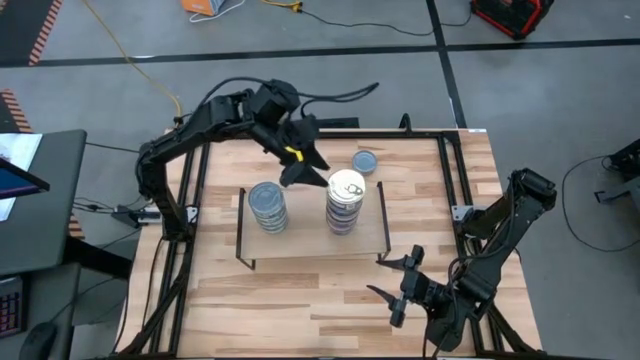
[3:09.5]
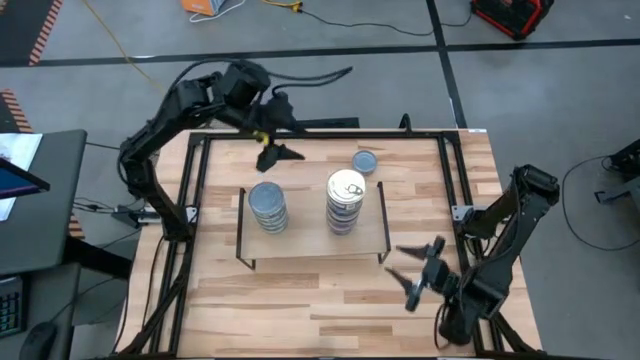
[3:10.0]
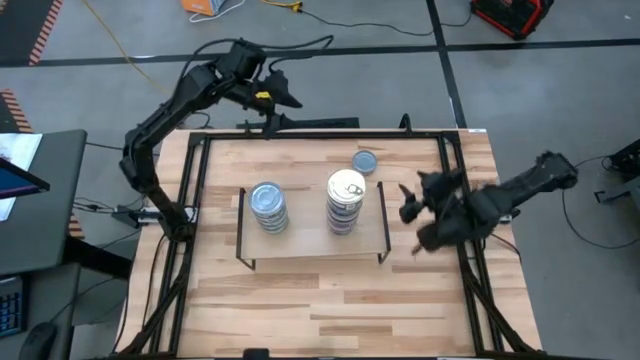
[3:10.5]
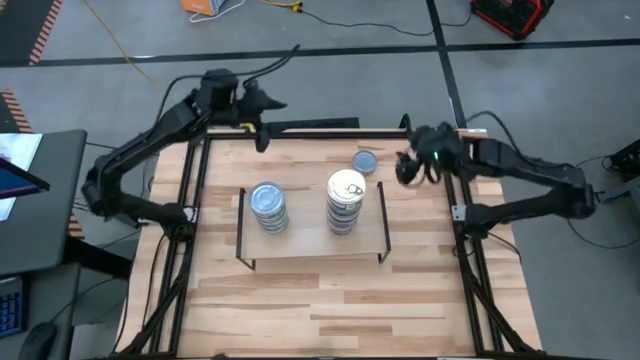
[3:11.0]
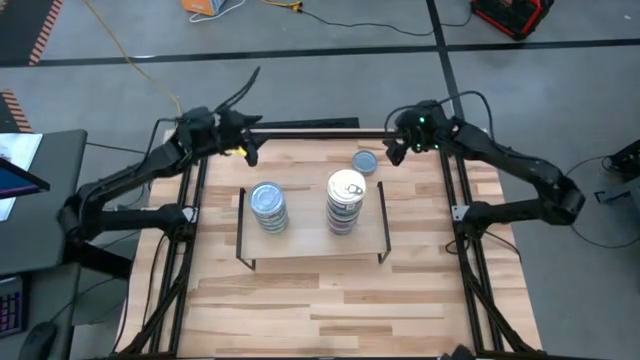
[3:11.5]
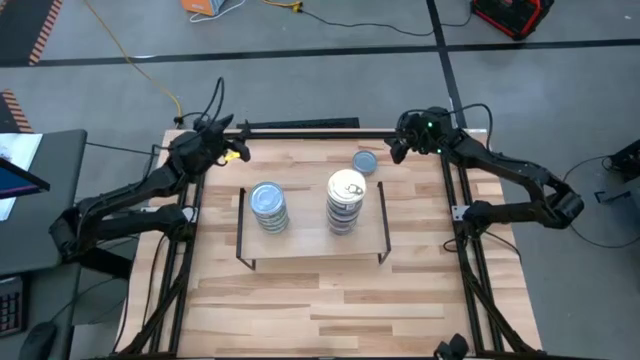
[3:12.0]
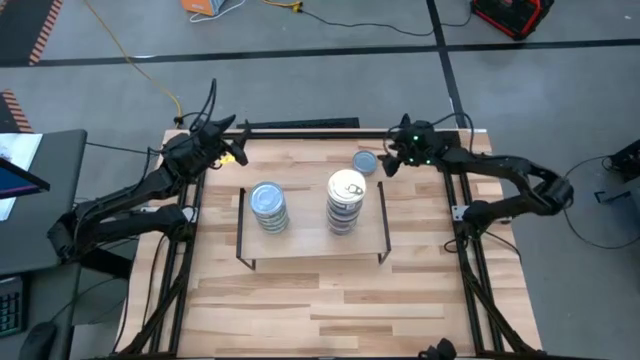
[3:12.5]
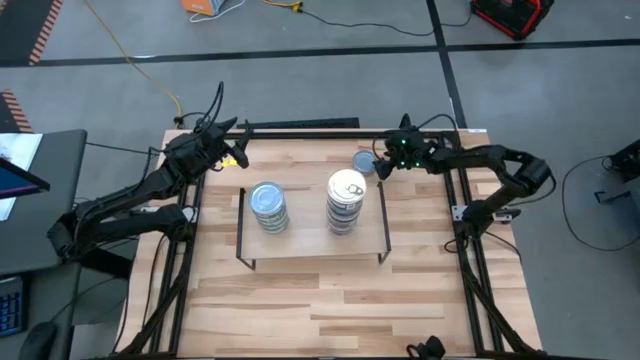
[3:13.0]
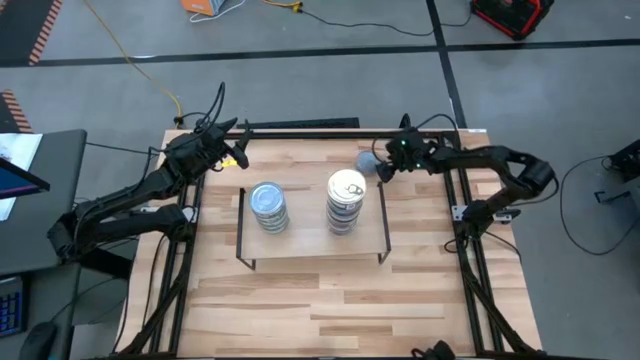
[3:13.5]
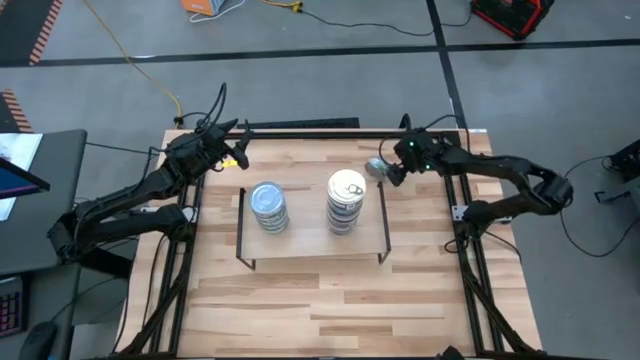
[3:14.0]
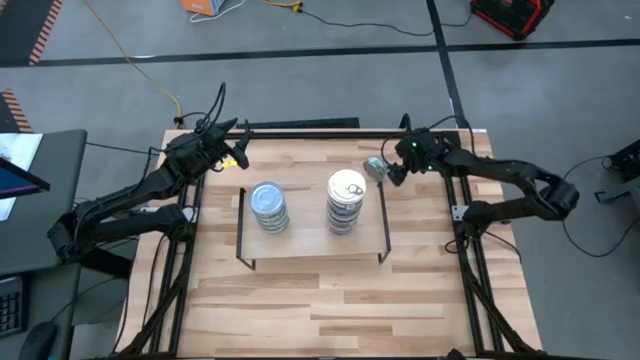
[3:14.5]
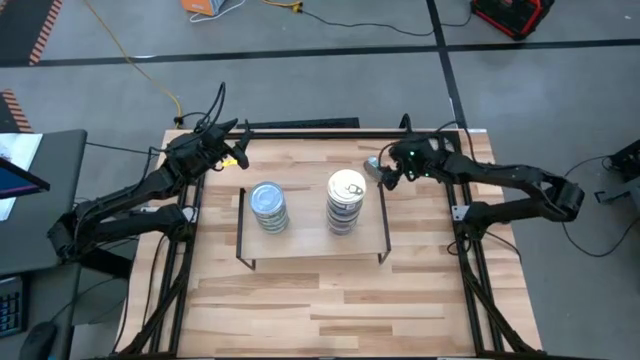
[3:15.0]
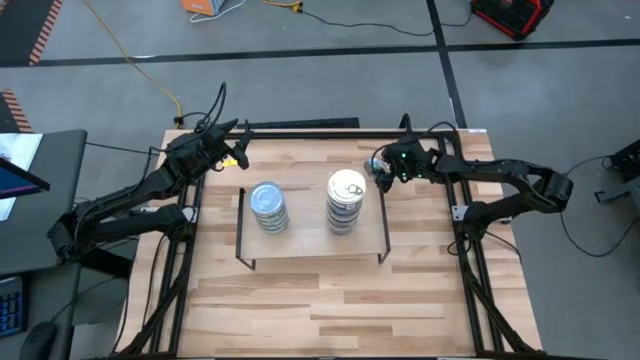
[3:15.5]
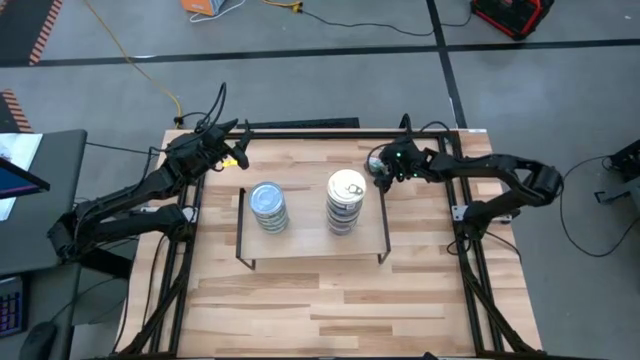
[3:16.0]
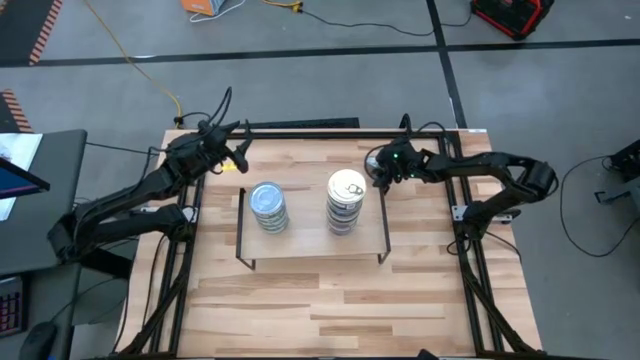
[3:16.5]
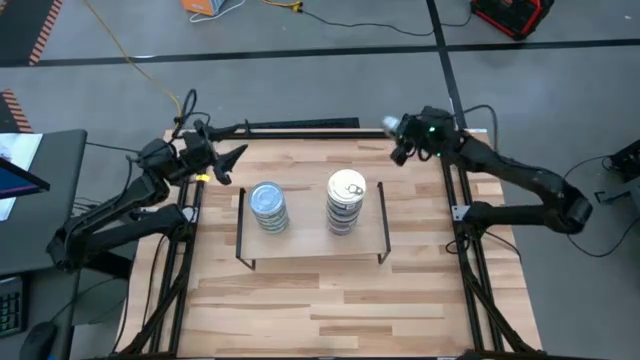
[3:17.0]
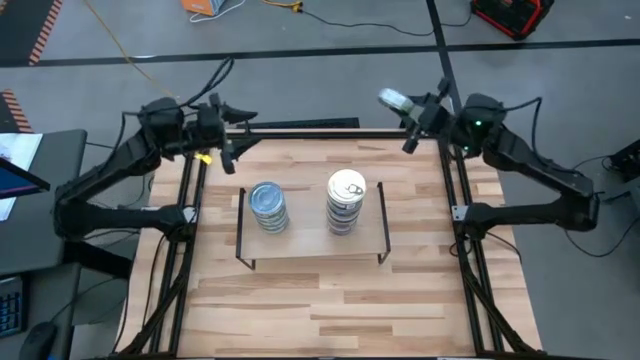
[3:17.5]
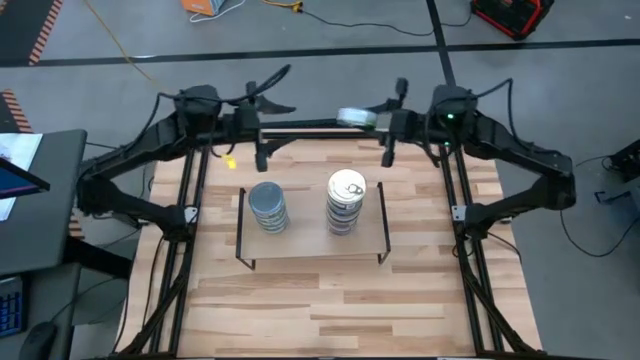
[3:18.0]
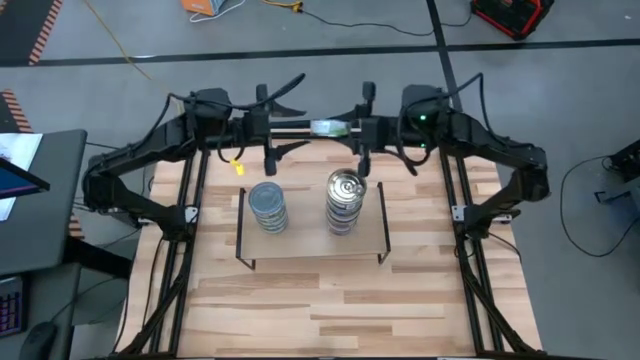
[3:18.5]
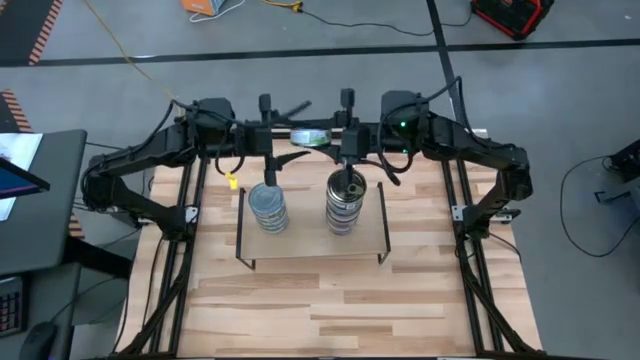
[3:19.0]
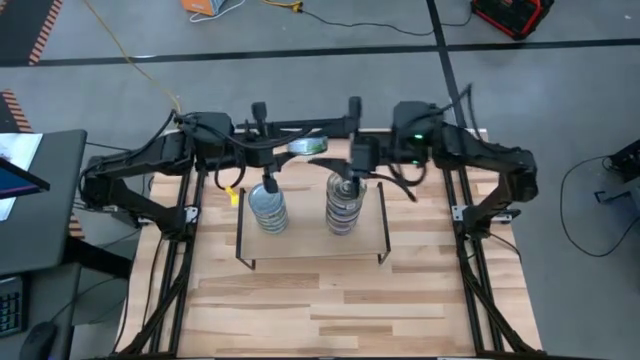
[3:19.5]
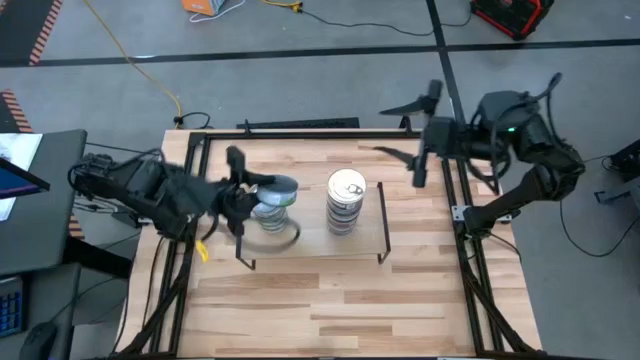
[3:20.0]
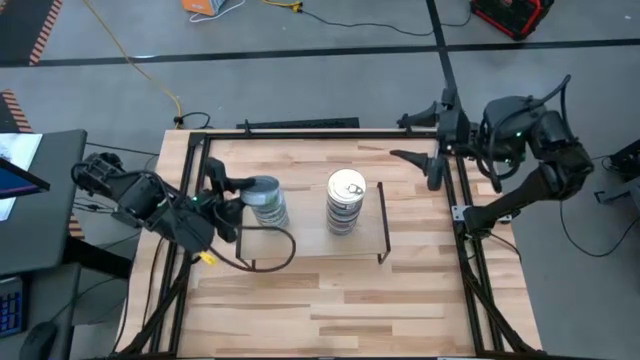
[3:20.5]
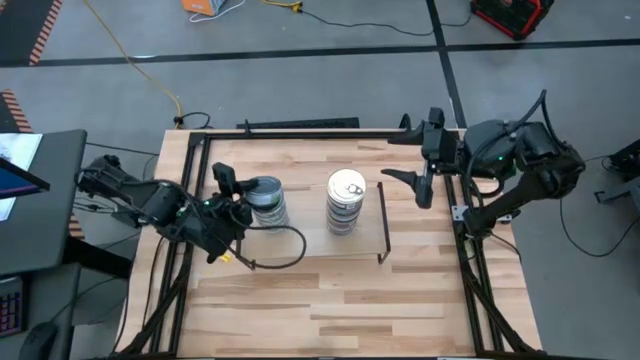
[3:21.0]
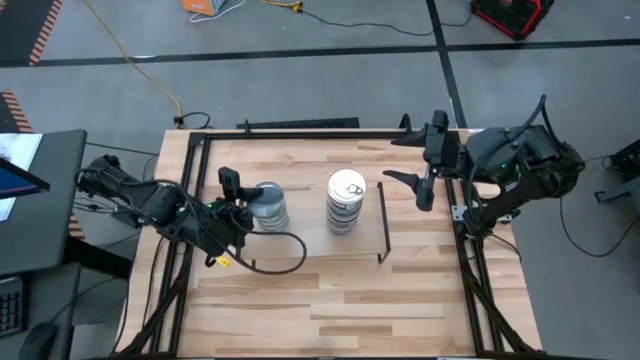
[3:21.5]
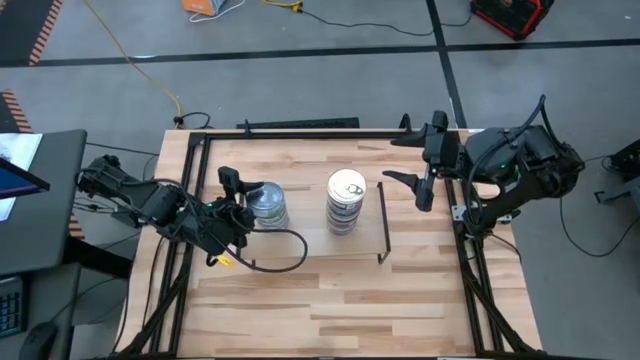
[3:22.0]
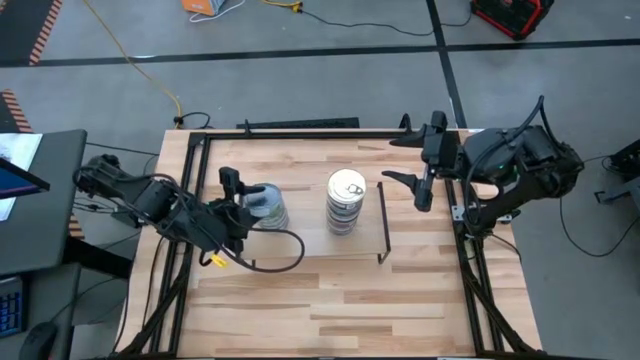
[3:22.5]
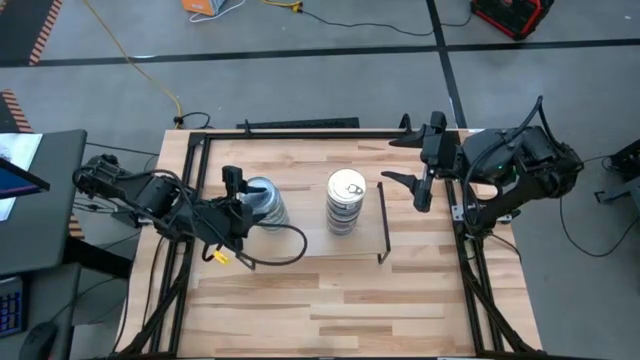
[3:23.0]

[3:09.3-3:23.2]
Task: Stack canned seafood by type on shelf
Stack the green tuna can on top of the green tuna can on the shelf

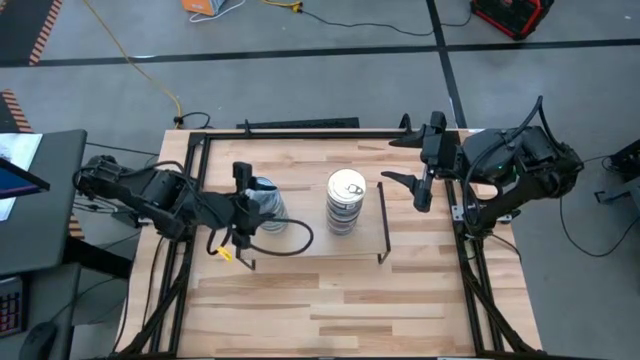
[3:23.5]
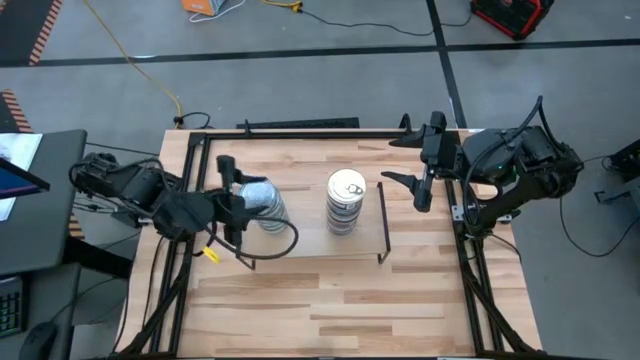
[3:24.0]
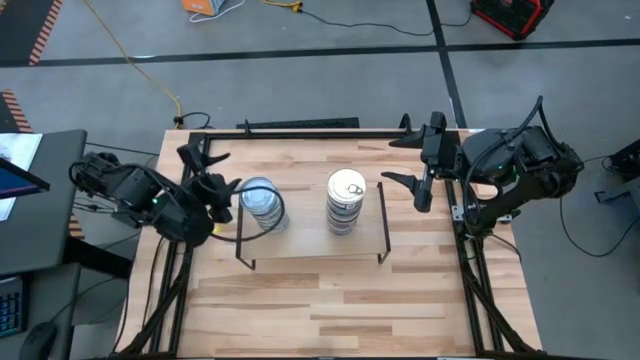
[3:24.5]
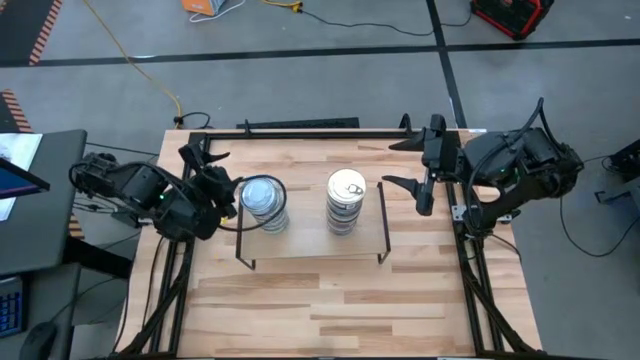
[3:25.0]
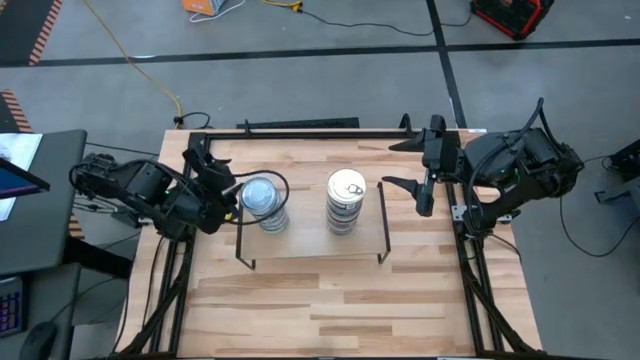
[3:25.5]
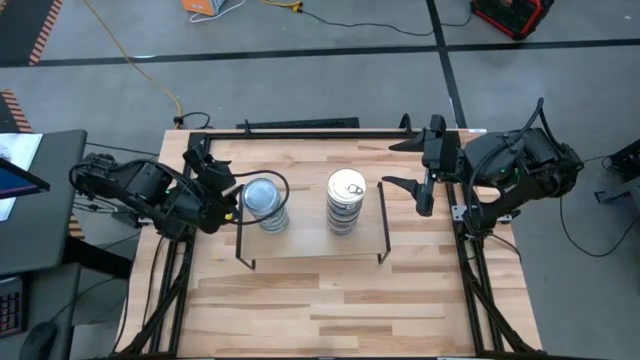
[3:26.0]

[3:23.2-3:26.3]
Adjust the green tuna can on top of the green tuna can

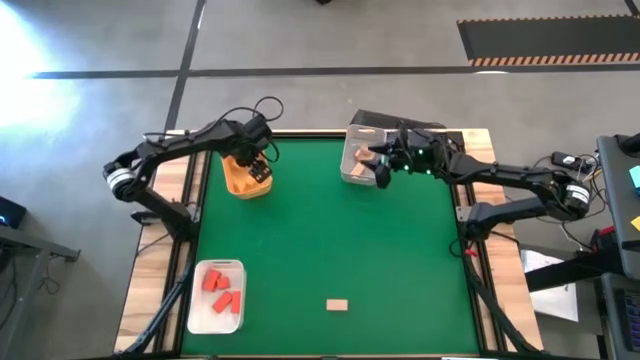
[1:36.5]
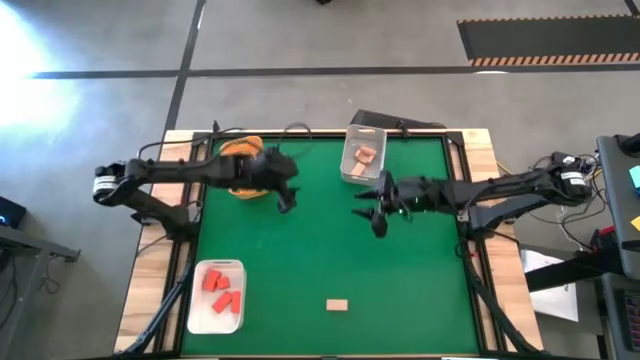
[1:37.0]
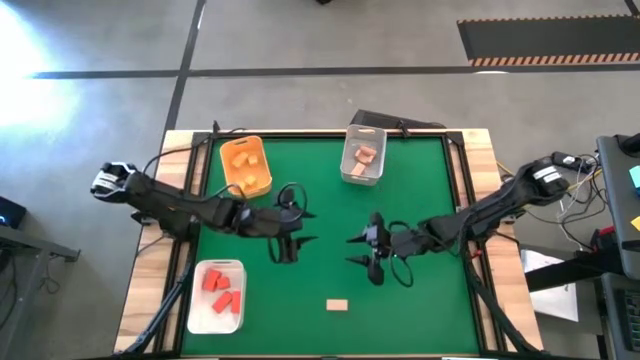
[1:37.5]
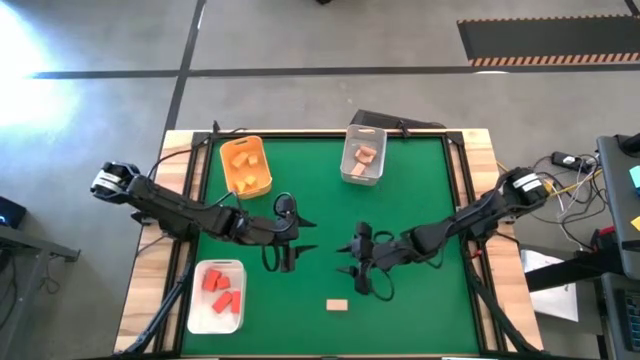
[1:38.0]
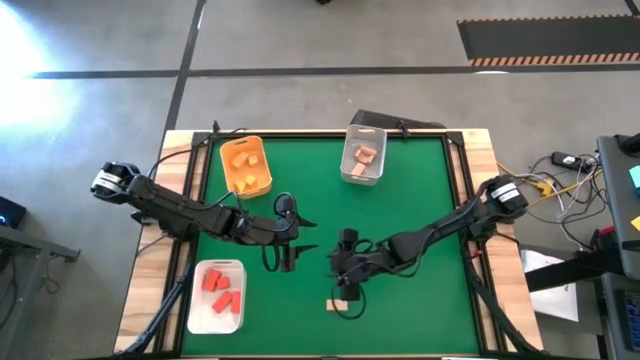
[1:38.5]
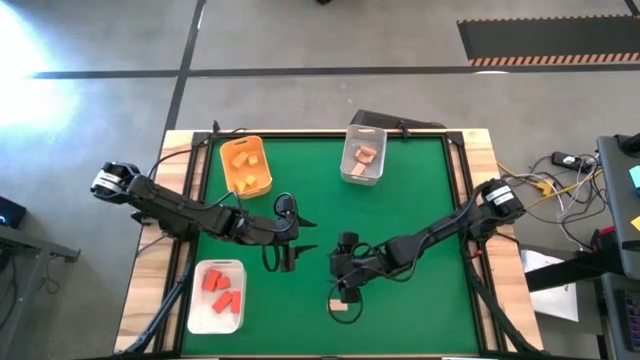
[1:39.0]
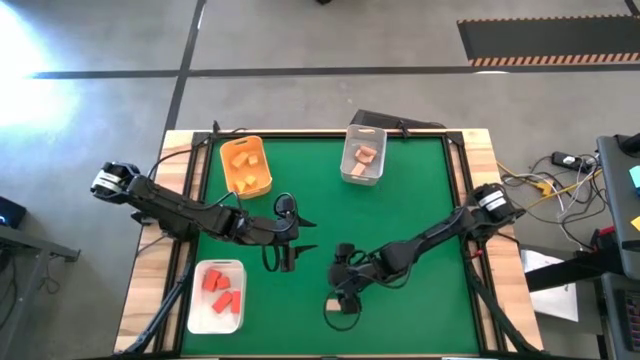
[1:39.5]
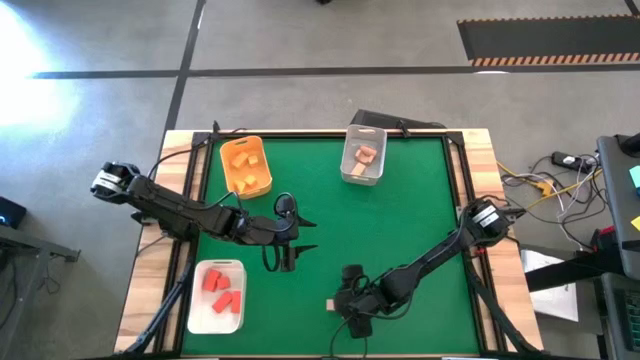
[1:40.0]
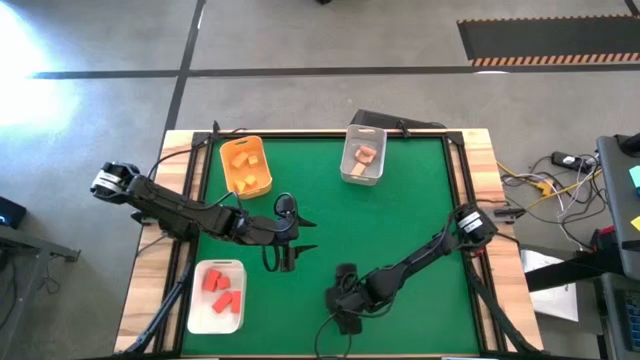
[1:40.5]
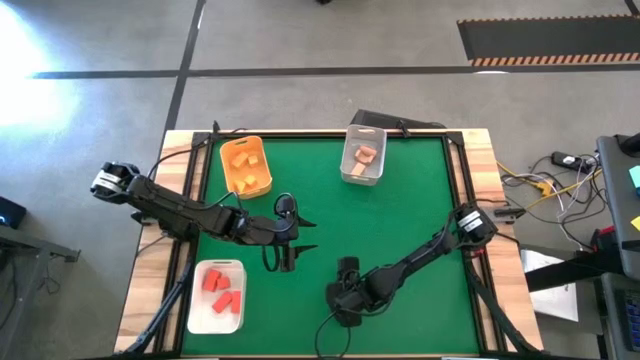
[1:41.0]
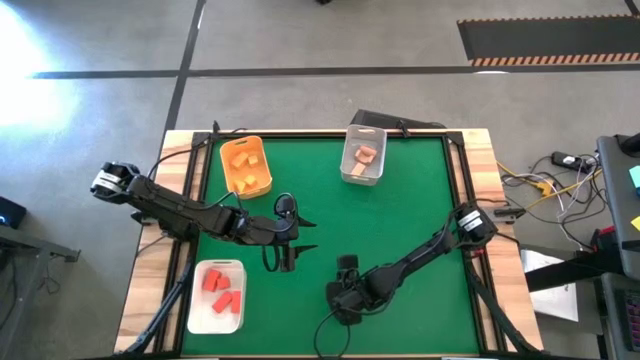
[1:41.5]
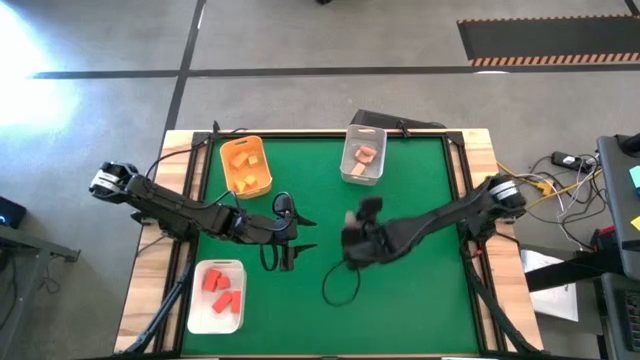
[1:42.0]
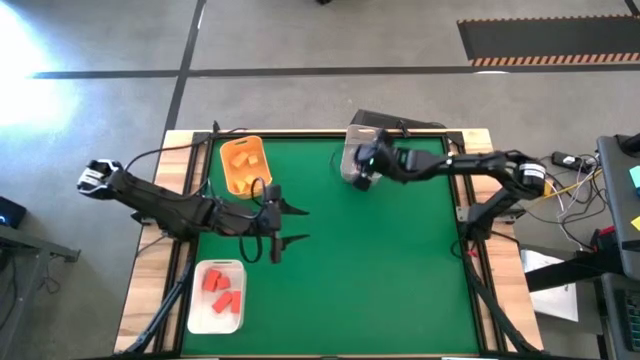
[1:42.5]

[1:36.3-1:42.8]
Task: Sort & place blocks by color
Put the brown block into the gray bin
